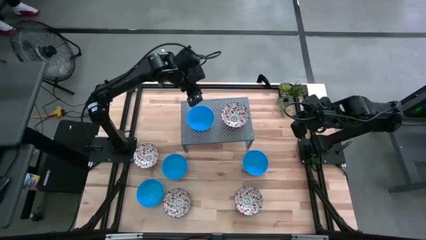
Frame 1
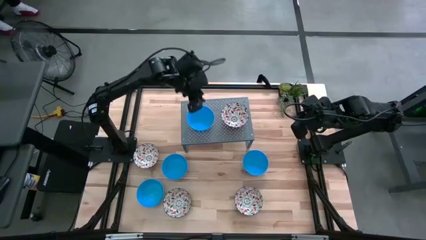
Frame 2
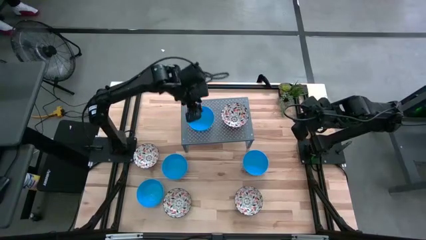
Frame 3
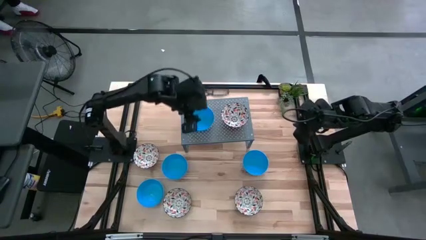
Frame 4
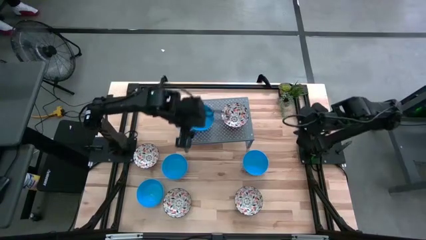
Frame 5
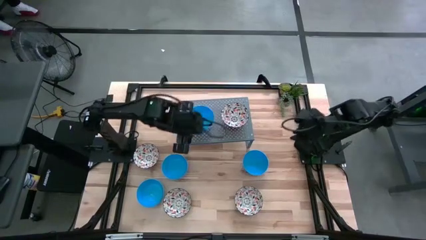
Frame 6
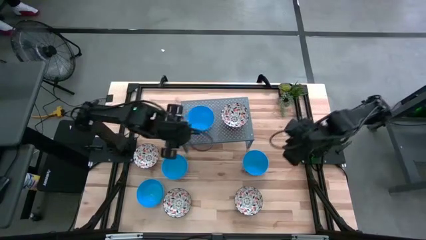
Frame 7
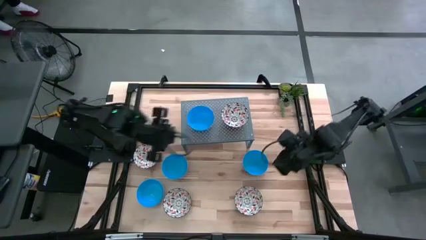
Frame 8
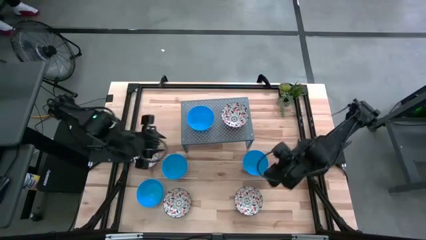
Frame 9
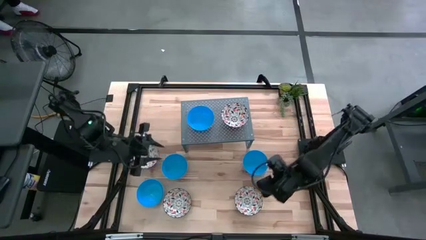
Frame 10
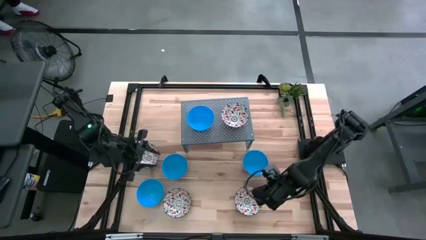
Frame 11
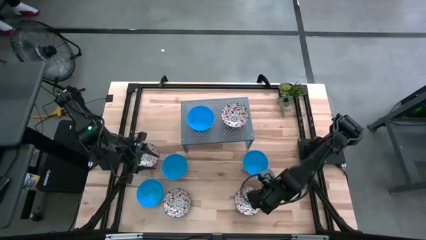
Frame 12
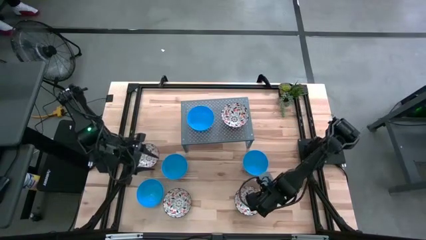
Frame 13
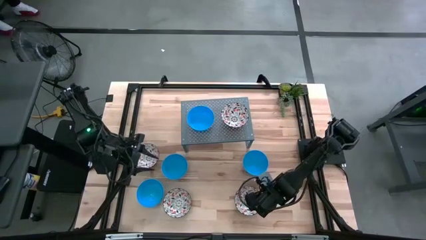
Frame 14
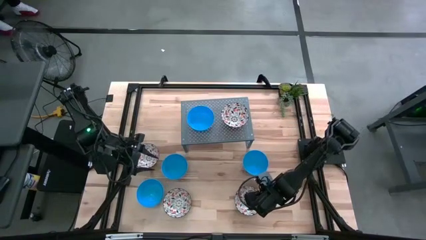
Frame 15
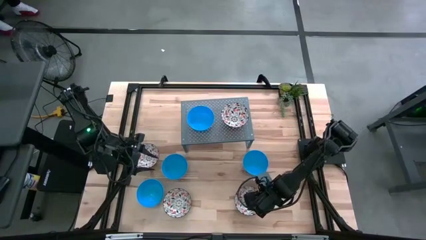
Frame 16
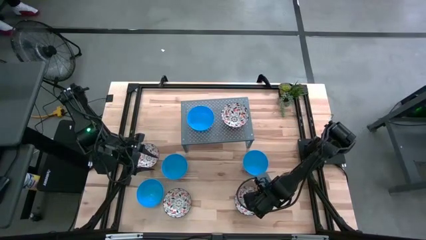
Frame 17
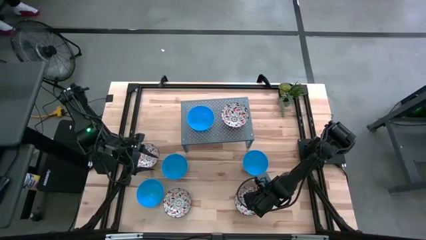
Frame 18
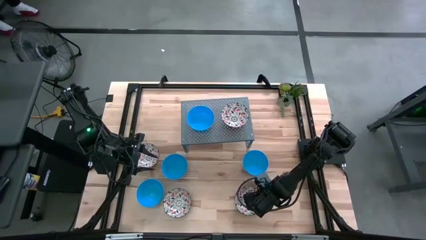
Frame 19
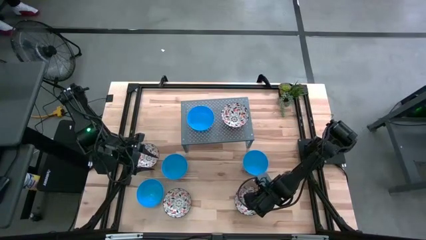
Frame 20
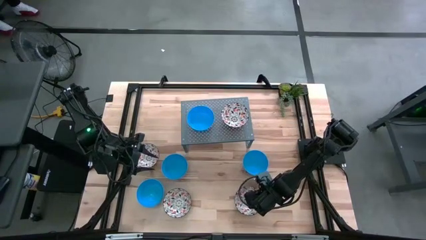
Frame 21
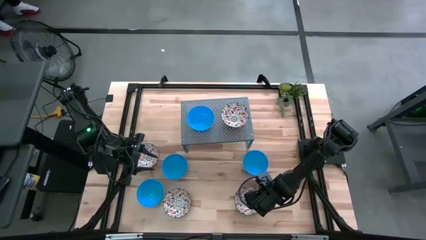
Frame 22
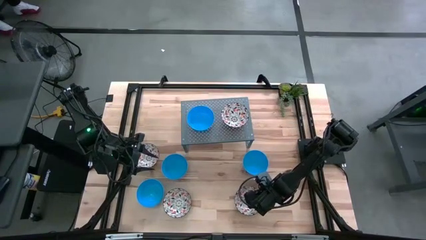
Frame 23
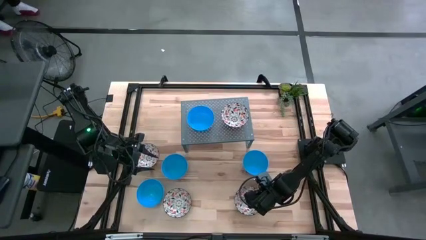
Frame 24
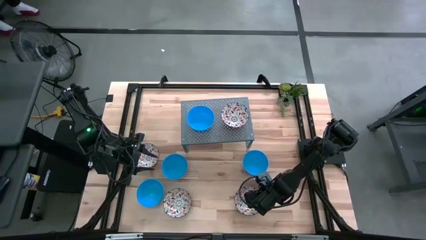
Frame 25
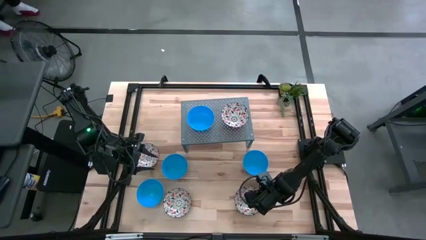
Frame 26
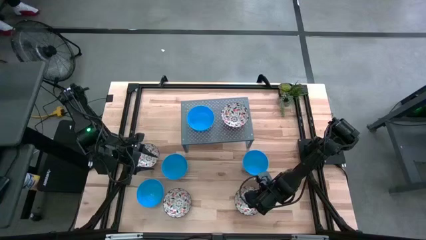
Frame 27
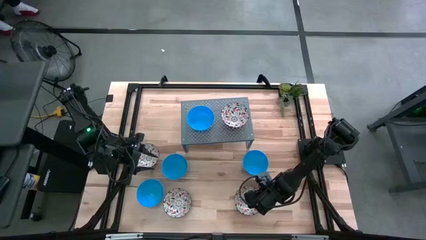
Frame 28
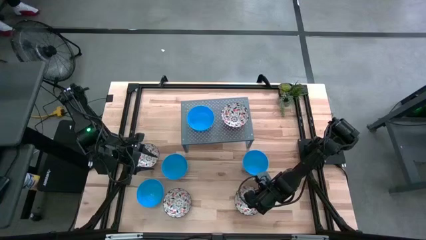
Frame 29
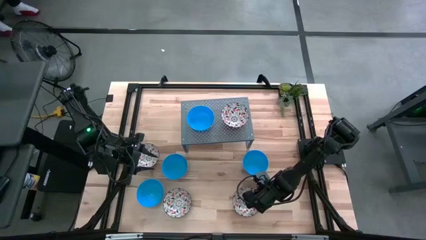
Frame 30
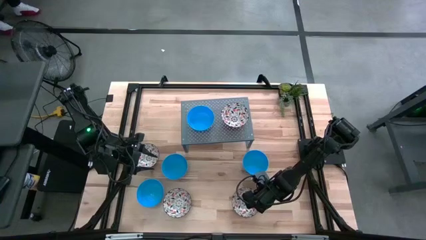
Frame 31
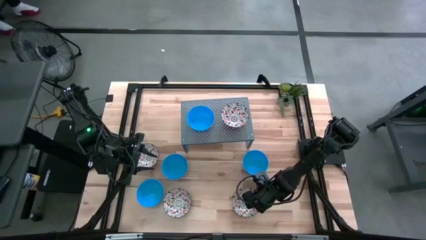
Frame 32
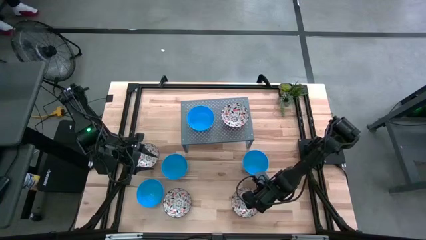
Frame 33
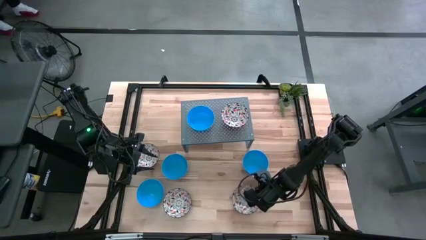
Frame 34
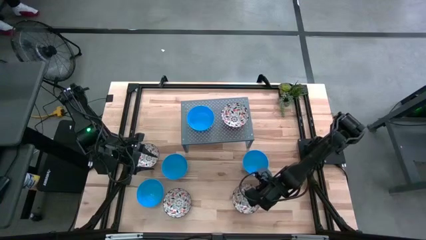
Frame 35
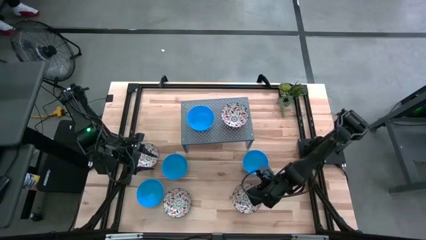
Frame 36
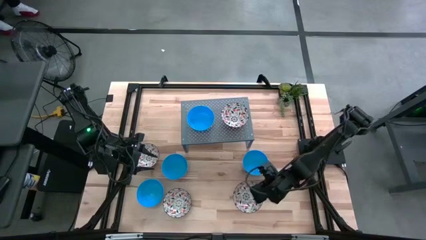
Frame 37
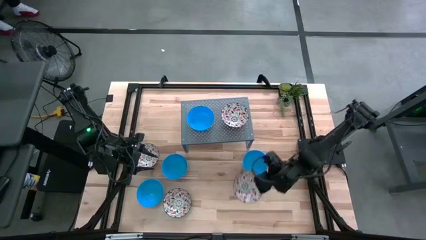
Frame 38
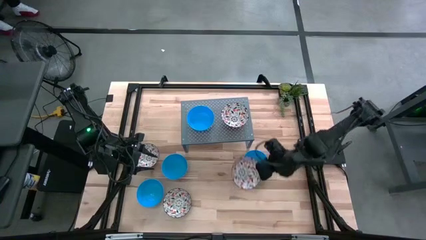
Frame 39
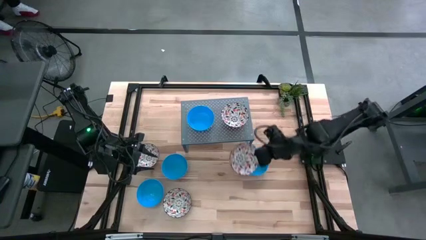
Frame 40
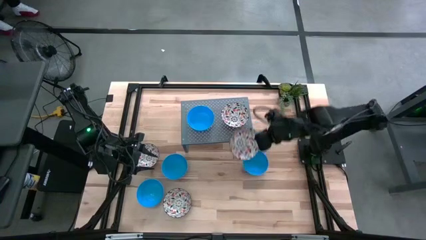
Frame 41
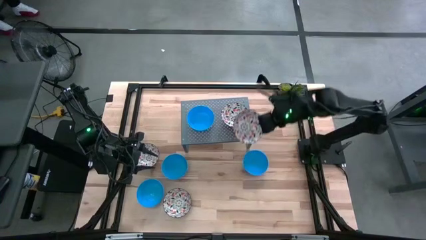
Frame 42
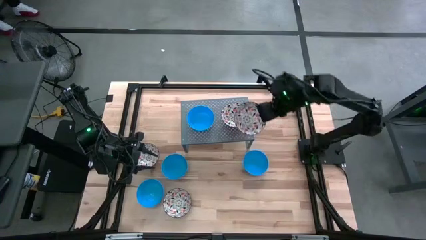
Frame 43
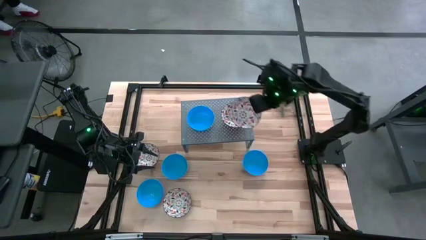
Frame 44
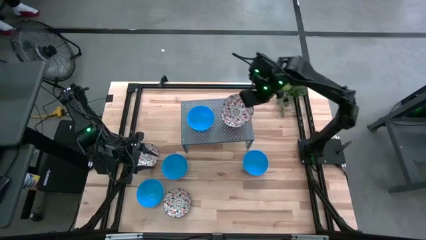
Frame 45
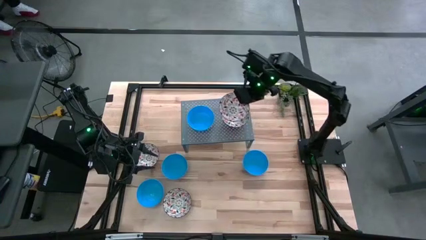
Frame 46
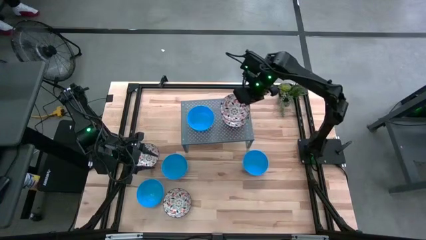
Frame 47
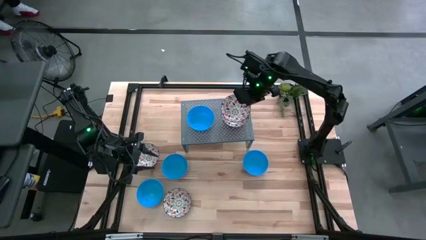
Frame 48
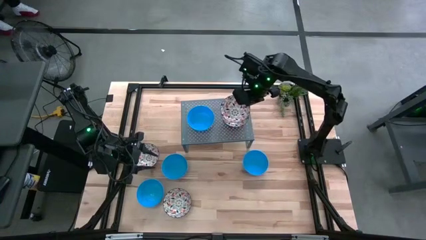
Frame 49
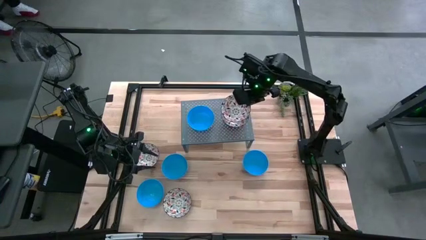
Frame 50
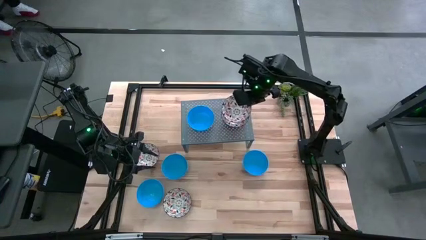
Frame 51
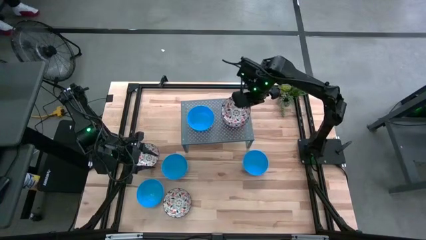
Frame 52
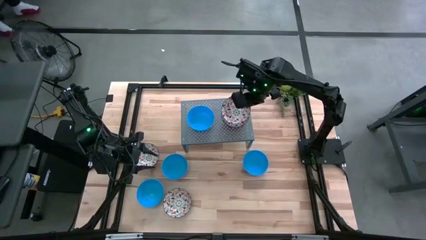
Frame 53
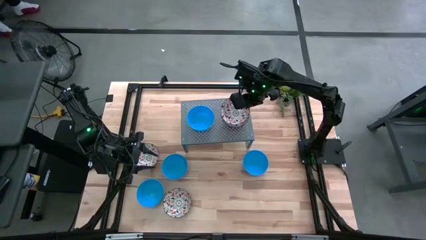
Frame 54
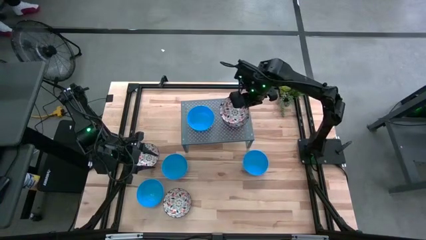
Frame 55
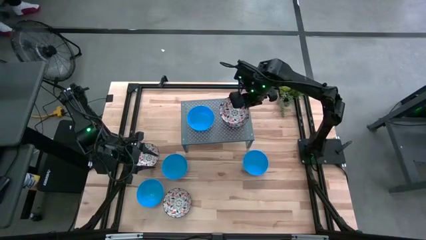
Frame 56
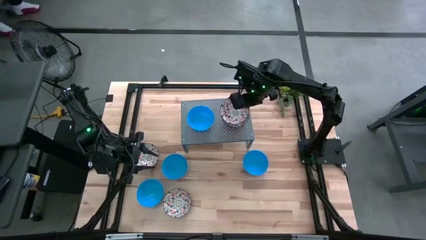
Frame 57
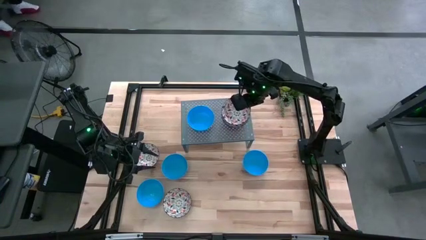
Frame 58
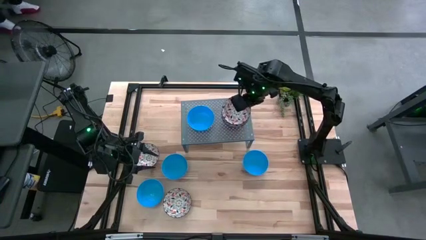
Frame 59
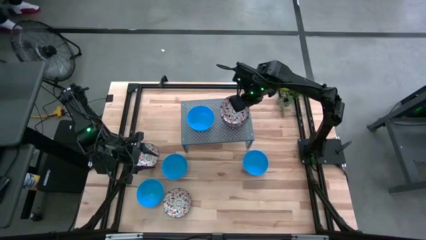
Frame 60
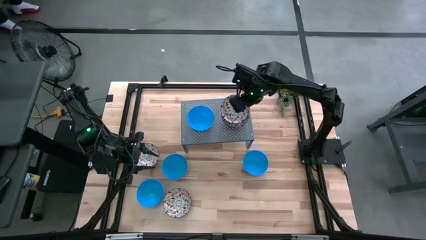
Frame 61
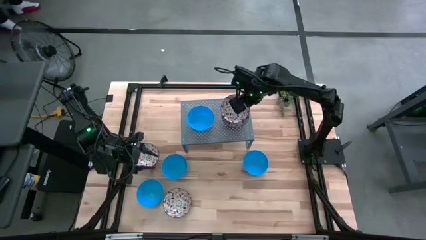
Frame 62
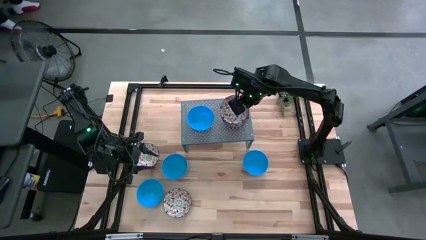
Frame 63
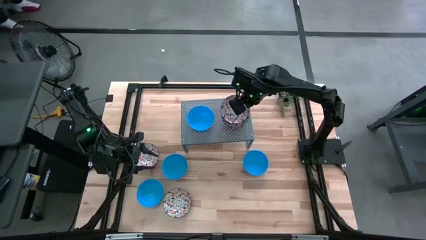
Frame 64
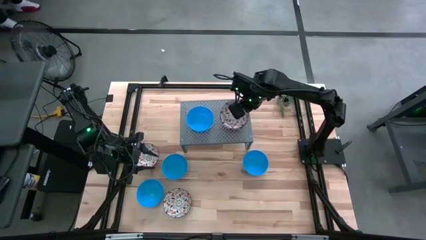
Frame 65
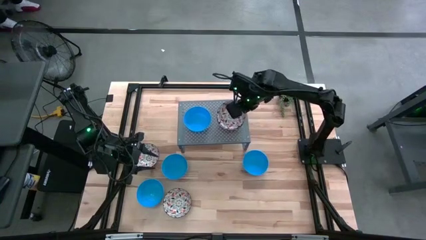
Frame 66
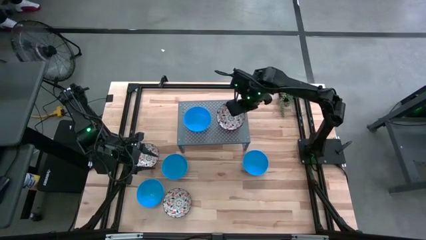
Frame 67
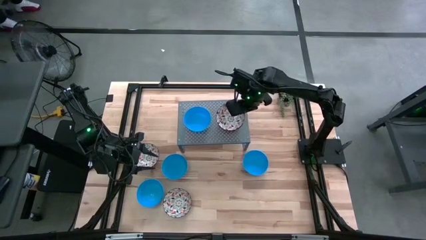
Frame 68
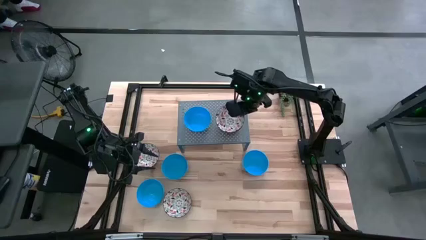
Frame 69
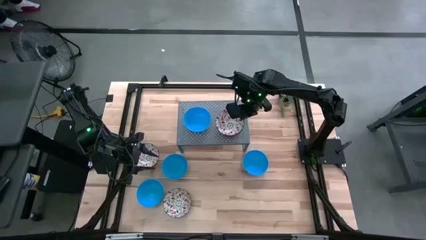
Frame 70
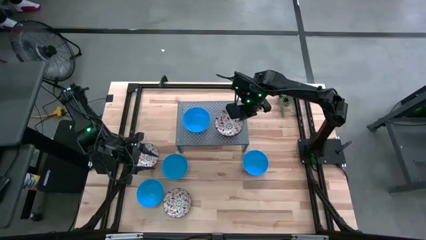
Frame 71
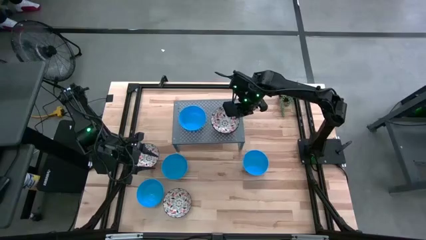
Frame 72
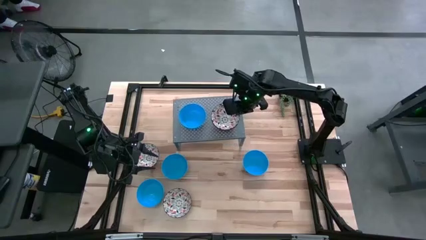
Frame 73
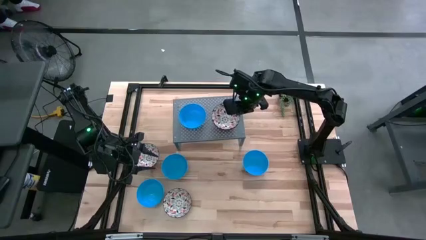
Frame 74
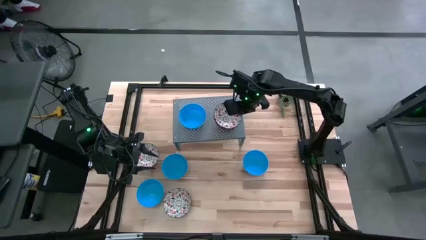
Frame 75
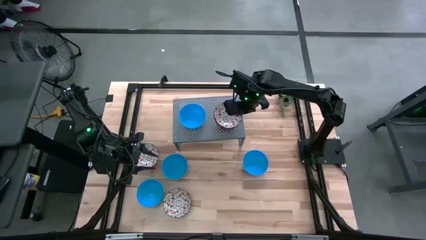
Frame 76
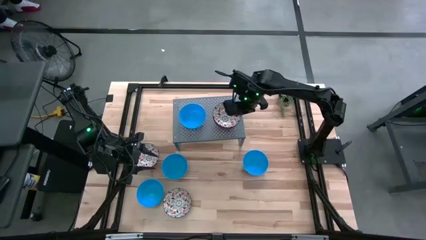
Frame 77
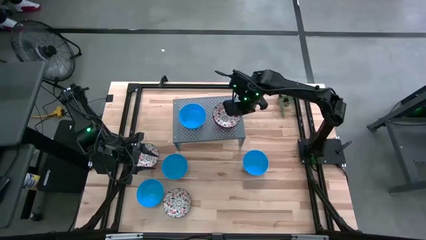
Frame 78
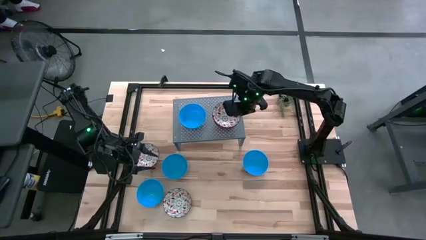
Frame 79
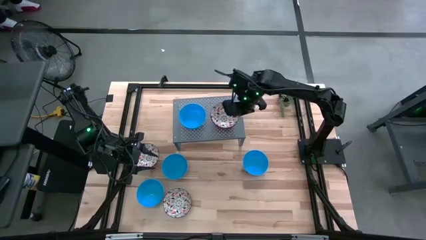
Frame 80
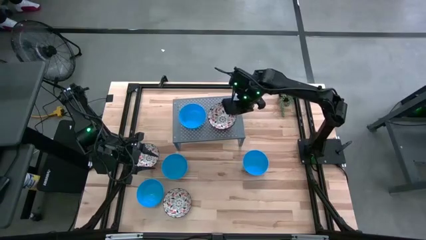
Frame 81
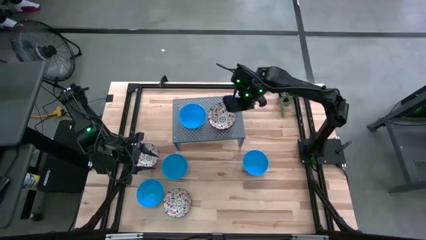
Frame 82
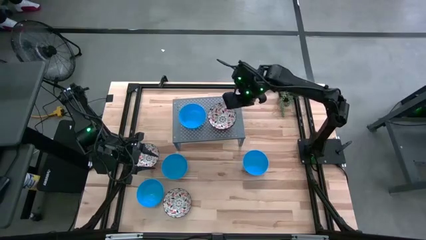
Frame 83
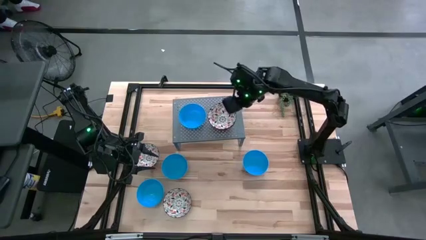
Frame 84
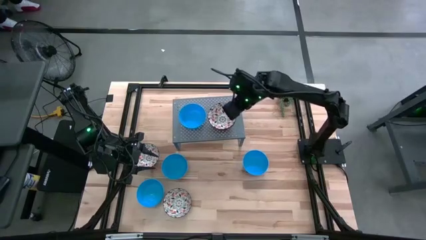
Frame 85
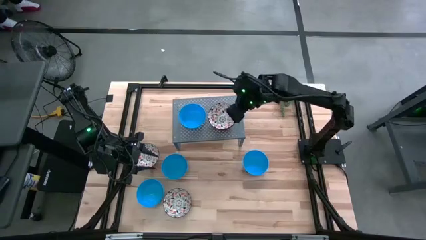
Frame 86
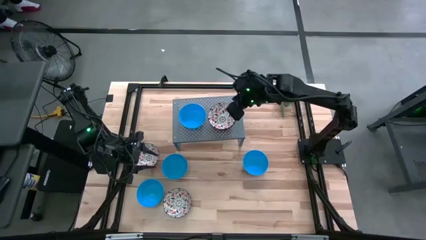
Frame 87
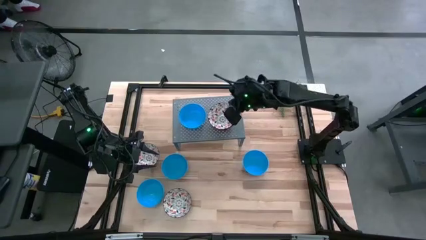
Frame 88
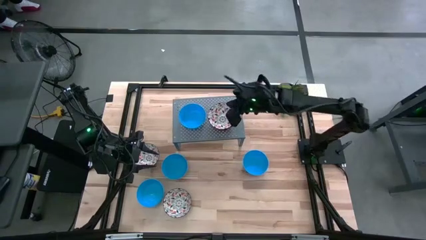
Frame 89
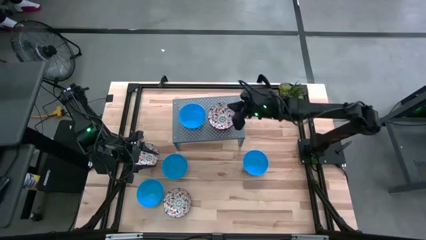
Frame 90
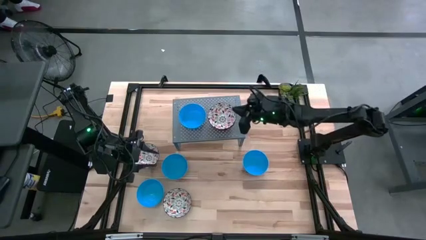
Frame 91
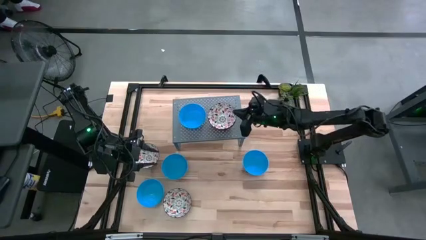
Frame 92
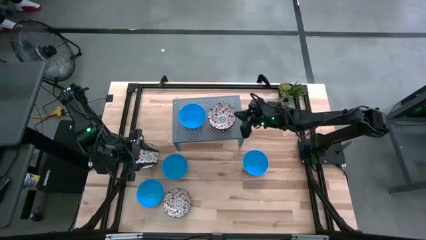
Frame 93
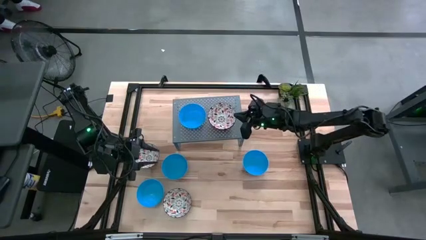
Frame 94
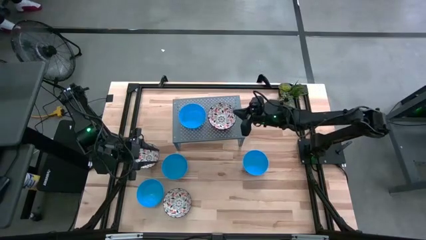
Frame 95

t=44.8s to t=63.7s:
Task: Pick & Place Mini bowls
Stack the white bowl on top of the white bowl on the shelf
